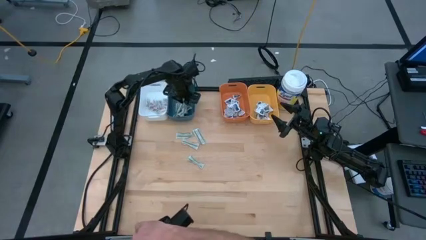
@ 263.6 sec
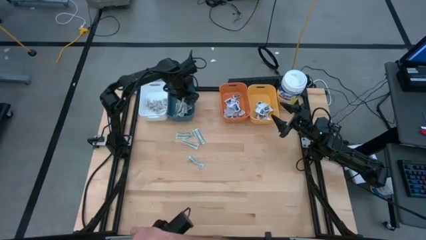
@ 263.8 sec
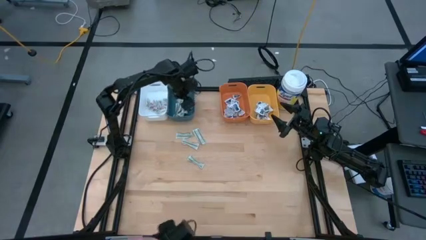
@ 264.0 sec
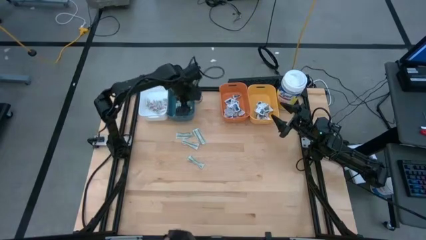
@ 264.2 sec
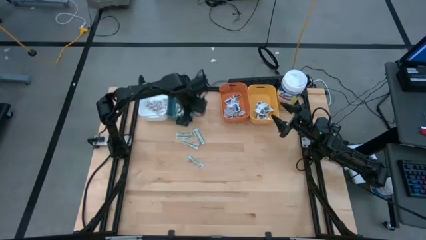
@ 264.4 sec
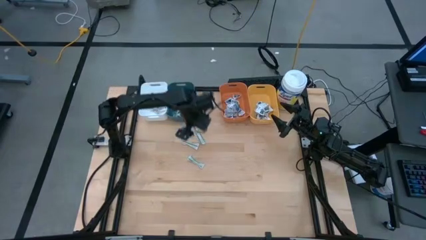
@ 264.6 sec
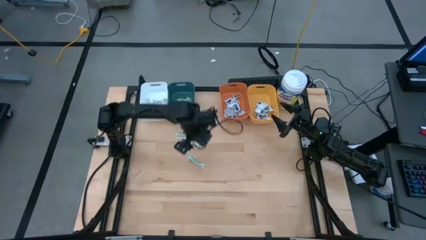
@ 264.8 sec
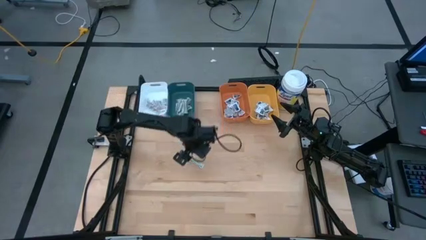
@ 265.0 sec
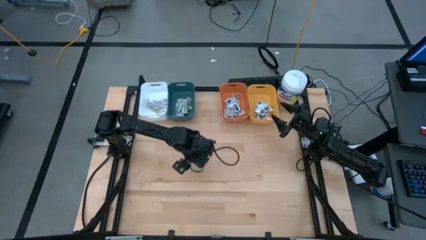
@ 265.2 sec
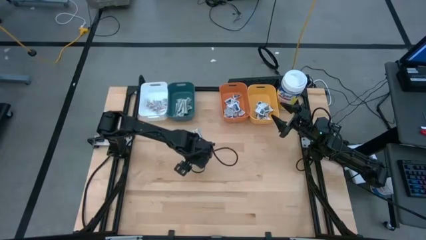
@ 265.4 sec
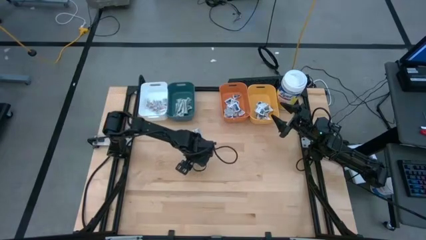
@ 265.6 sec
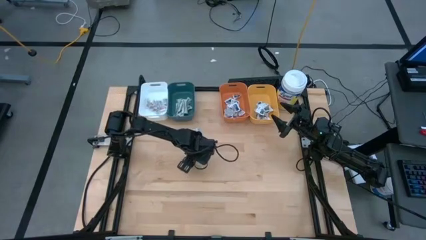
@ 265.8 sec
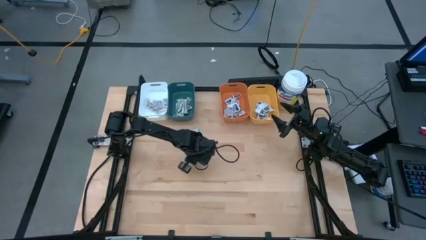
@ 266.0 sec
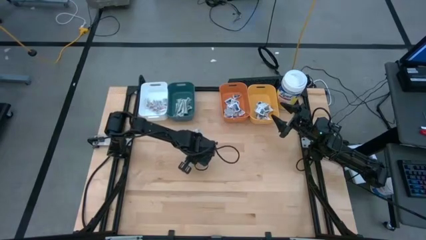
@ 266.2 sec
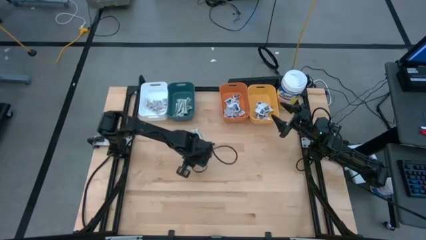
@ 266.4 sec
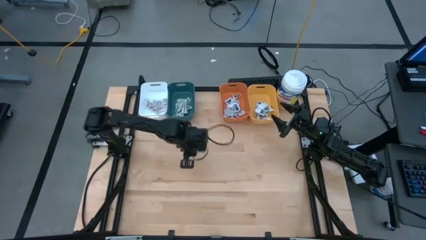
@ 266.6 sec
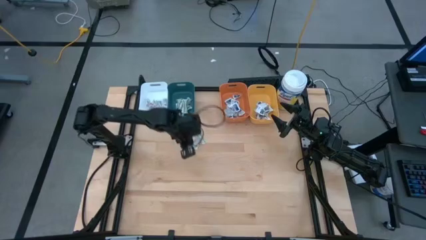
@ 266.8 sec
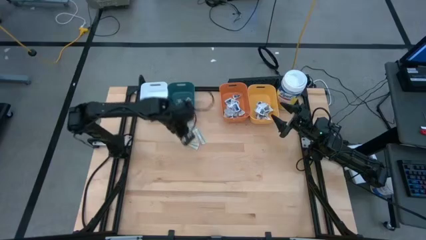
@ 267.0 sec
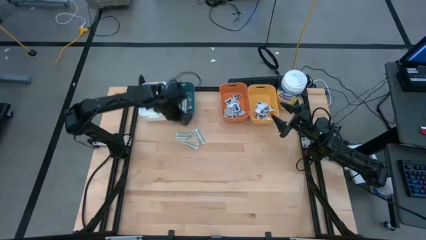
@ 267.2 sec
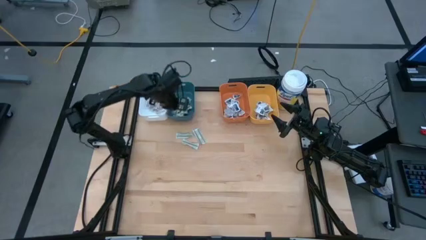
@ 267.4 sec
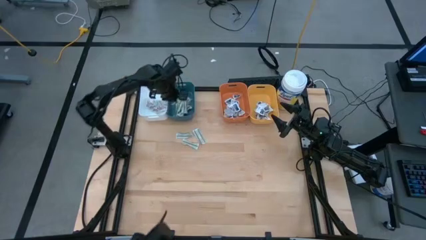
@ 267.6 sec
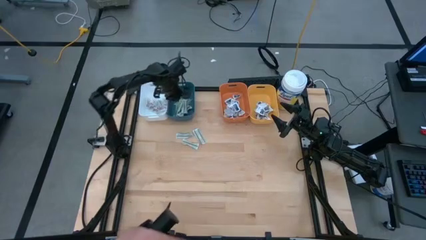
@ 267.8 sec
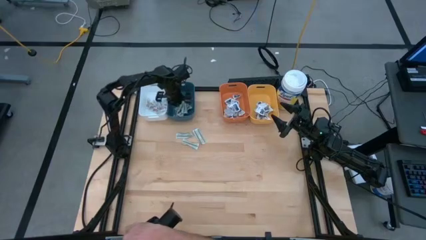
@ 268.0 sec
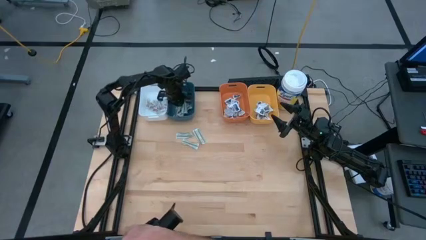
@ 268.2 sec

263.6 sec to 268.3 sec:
Task: Pick & Place First Aid Supplies
Put the bandage pack into the blue bin

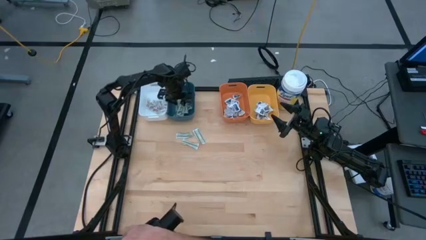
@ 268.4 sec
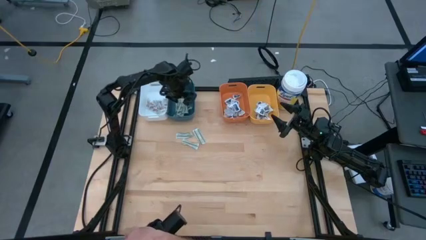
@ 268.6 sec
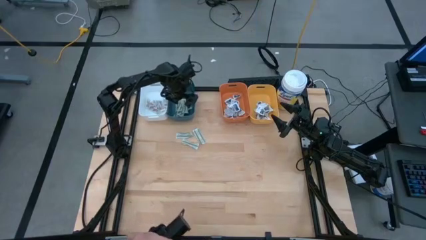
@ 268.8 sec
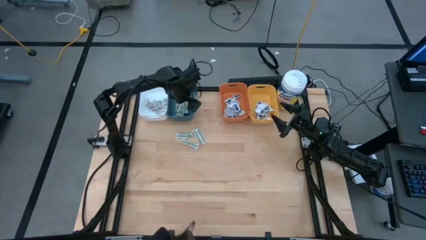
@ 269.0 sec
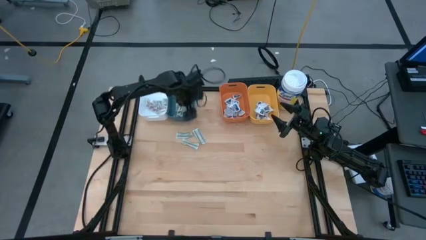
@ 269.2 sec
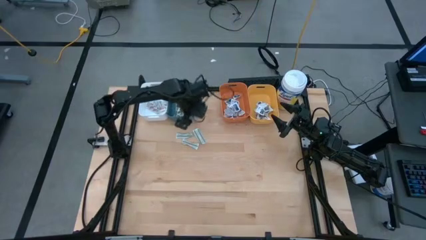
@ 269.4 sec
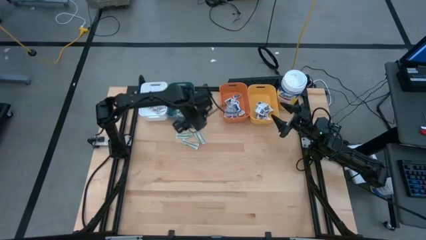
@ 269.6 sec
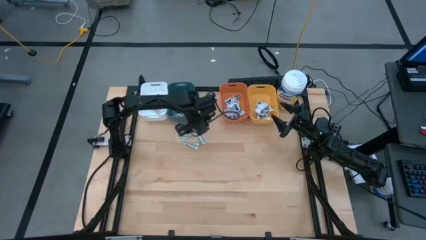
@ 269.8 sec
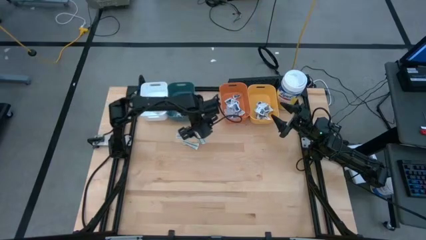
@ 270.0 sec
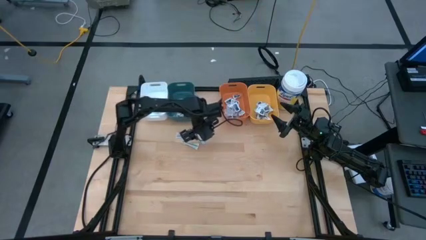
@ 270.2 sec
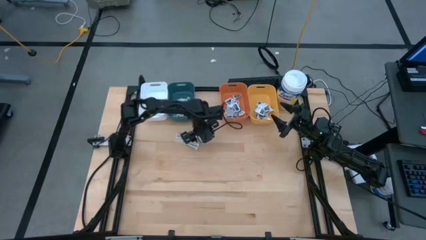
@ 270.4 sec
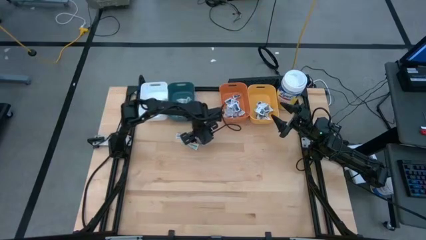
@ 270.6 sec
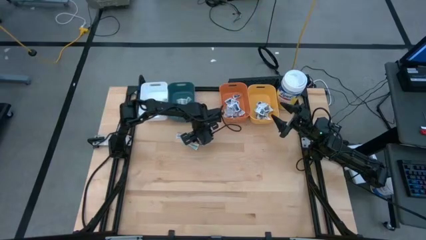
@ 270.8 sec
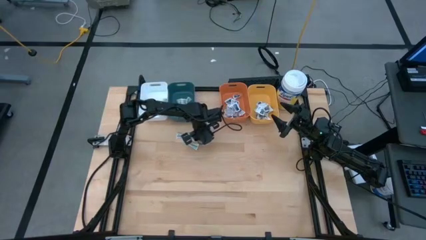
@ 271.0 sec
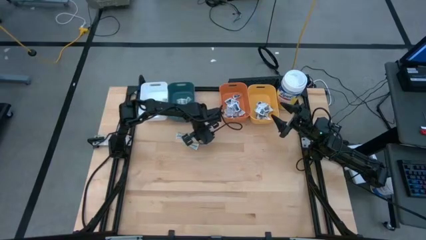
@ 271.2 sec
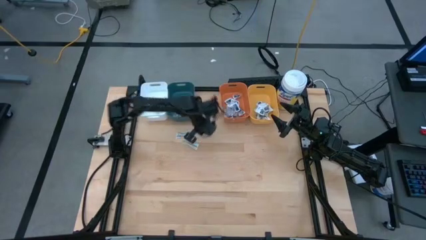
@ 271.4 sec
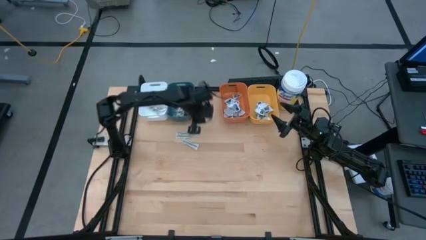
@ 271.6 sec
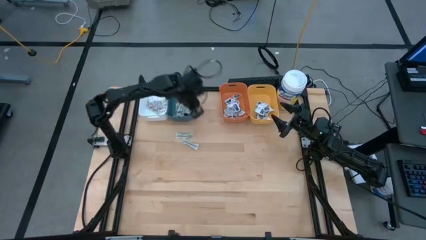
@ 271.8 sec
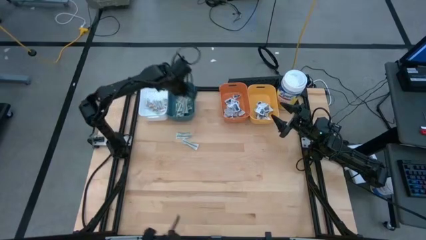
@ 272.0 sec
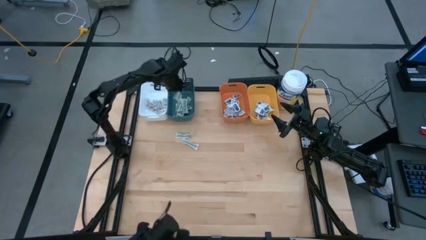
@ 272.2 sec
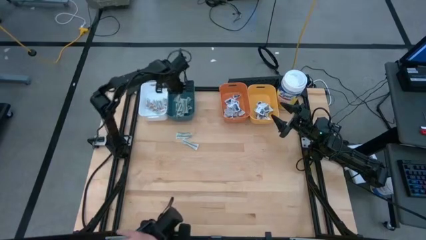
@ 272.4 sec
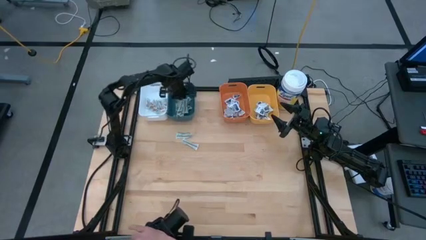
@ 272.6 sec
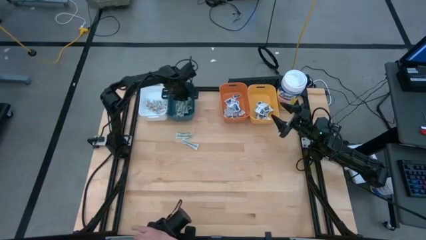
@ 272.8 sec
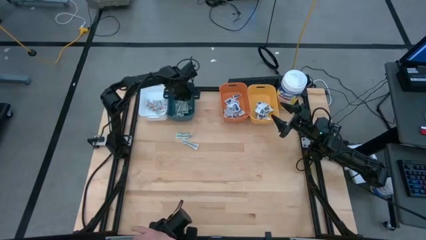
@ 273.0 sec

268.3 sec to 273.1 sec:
Put the bandage pack into the blue bin

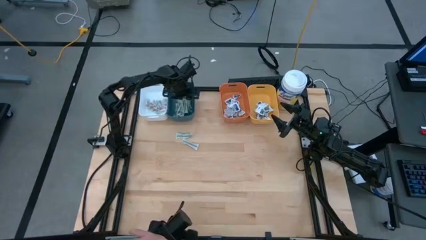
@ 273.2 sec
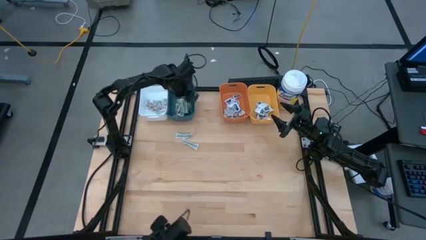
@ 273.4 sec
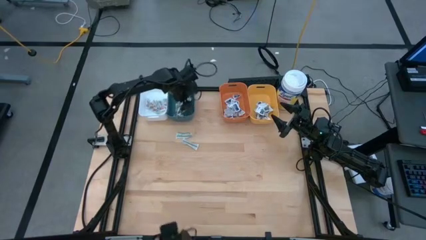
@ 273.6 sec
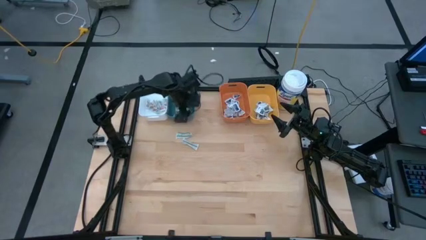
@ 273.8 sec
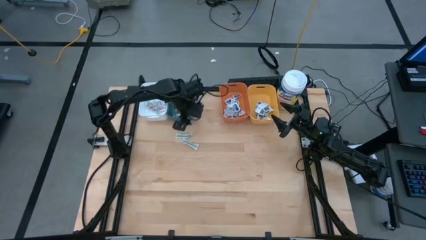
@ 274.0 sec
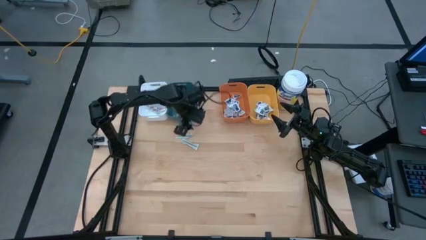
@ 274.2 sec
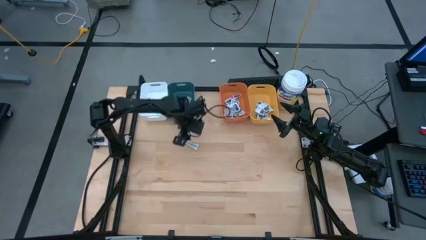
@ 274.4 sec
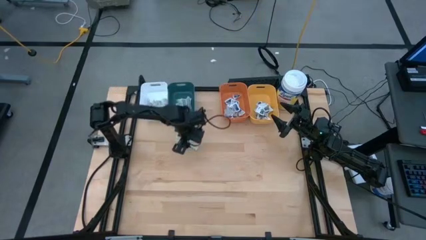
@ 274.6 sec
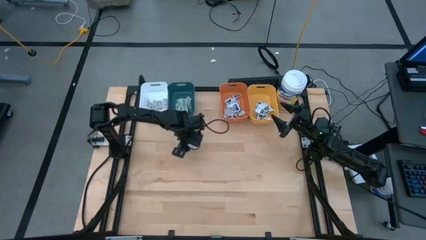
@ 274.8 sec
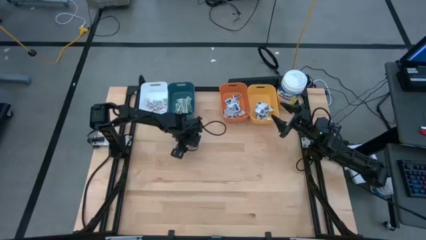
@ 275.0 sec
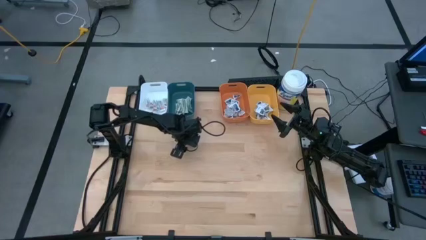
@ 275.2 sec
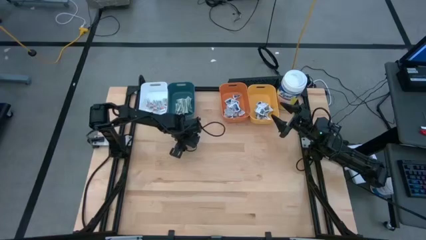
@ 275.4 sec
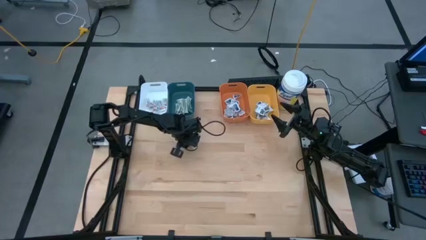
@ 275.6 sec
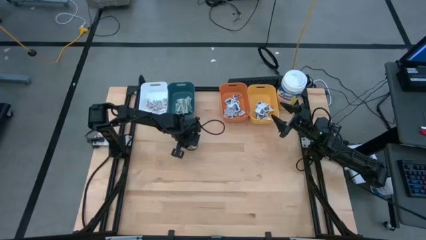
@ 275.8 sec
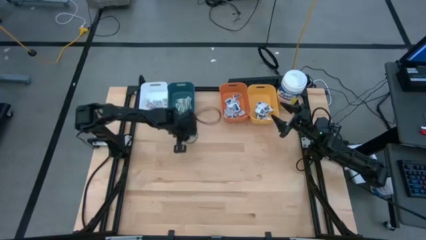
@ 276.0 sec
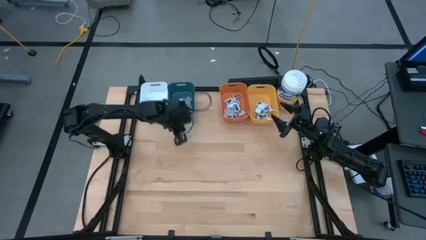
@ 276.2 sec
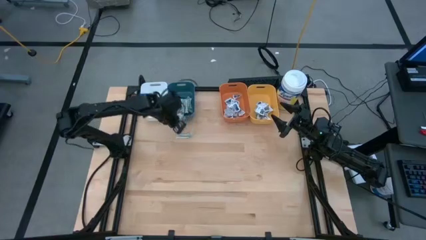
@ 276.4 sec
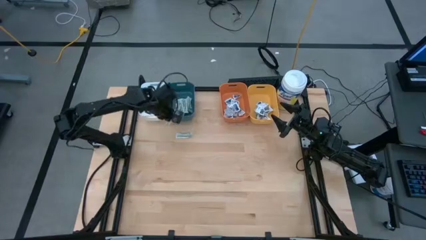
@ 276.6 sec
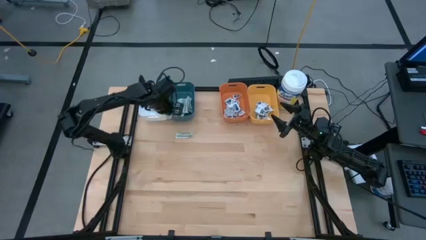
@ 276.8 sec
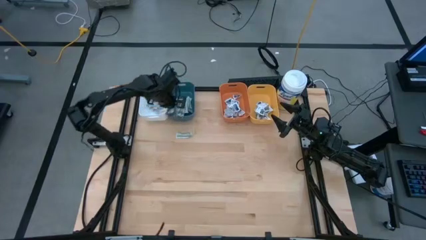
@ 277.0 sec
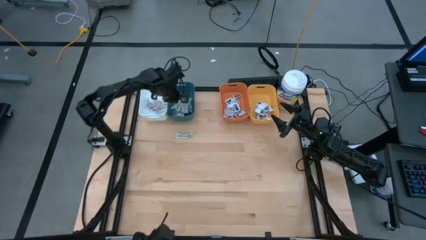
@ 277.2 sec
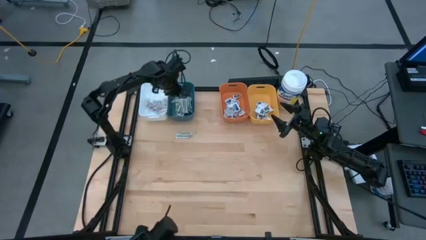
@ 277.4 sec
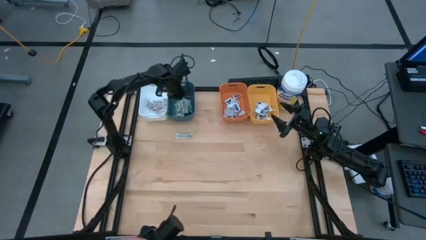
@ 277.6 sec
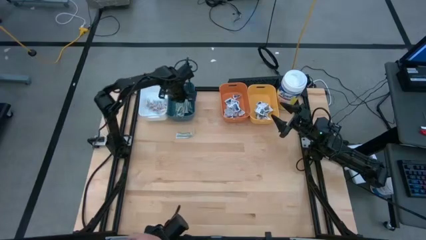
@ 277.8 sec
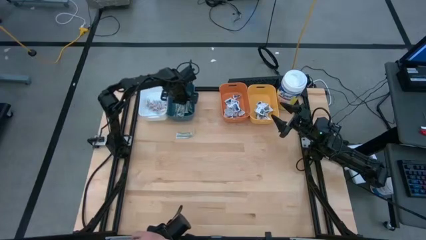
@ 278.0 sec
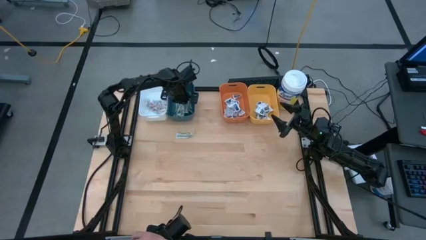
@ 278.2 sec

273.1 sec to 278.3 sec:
Put the bandage pack into the blue bin
